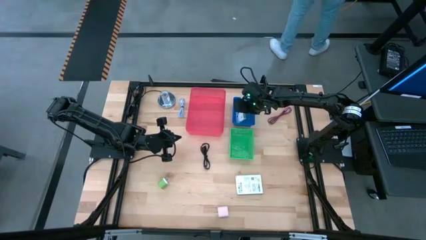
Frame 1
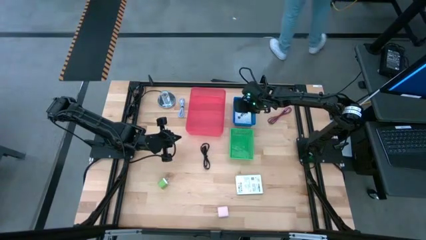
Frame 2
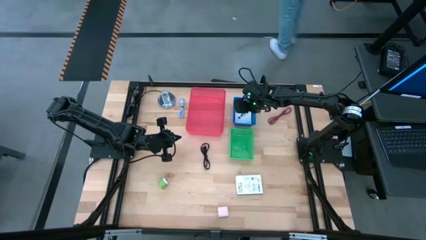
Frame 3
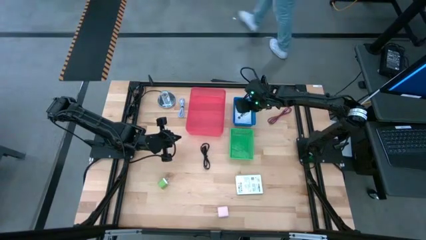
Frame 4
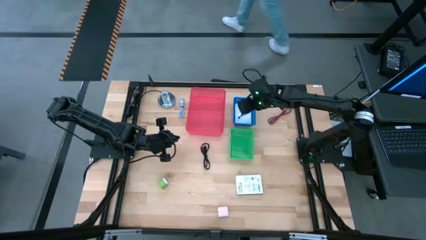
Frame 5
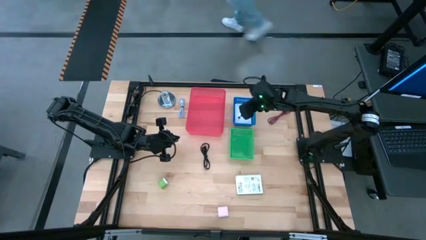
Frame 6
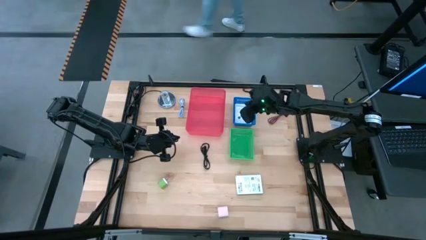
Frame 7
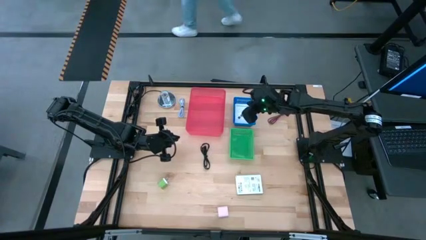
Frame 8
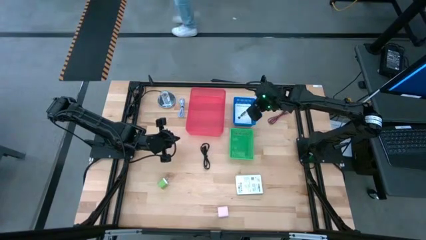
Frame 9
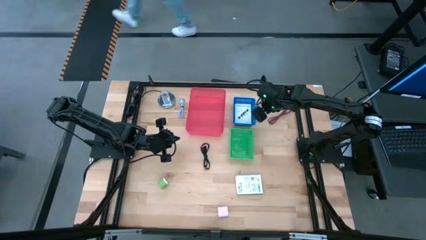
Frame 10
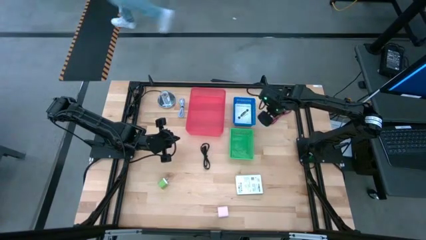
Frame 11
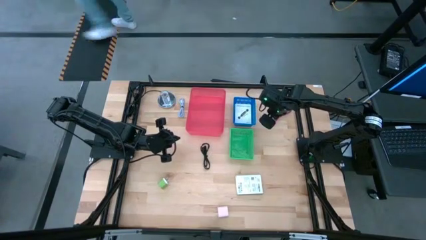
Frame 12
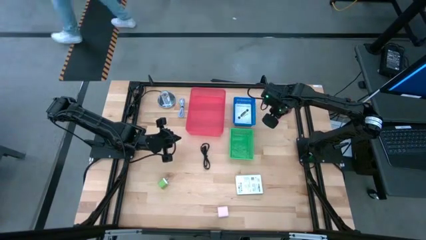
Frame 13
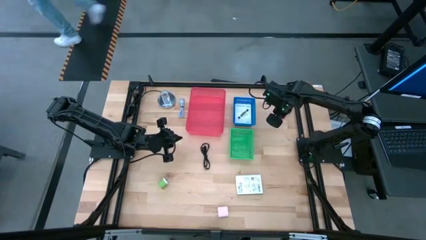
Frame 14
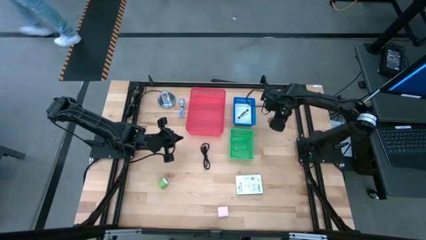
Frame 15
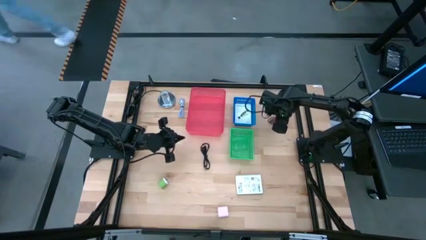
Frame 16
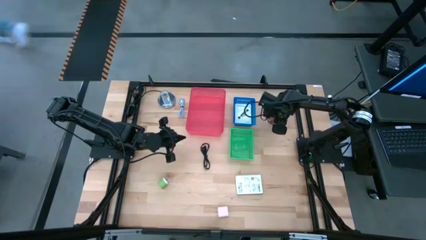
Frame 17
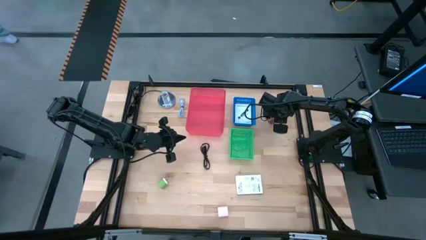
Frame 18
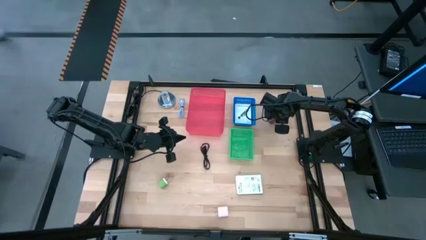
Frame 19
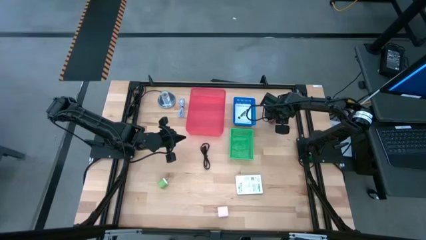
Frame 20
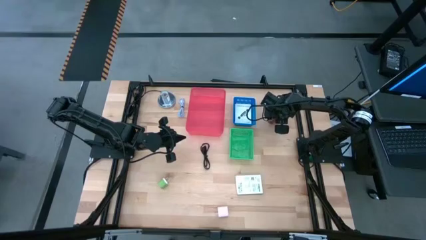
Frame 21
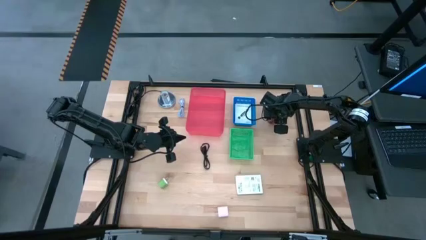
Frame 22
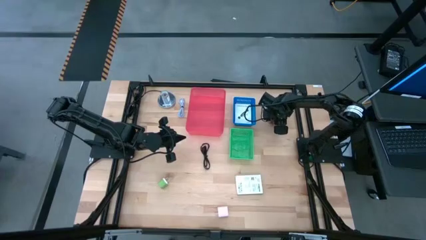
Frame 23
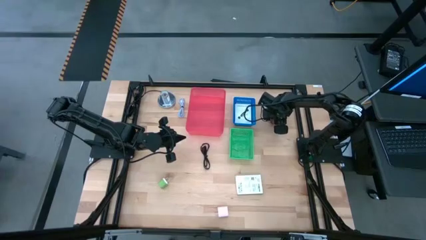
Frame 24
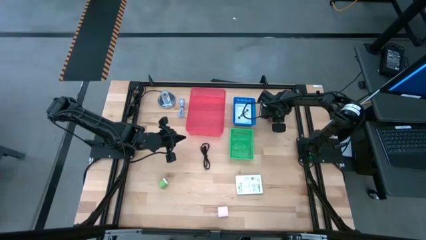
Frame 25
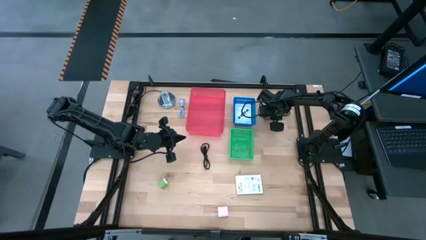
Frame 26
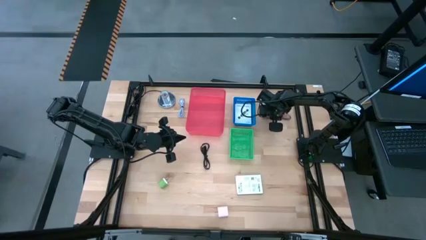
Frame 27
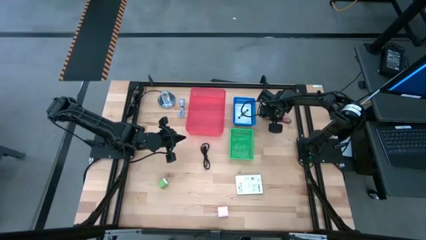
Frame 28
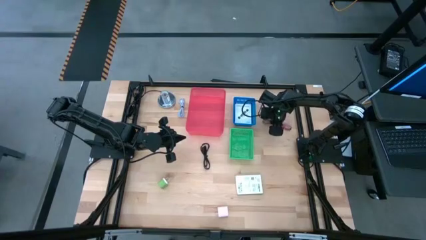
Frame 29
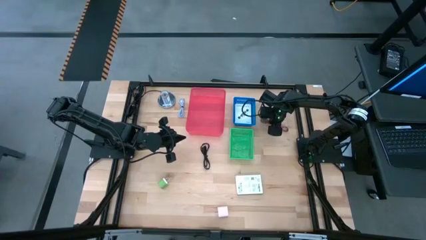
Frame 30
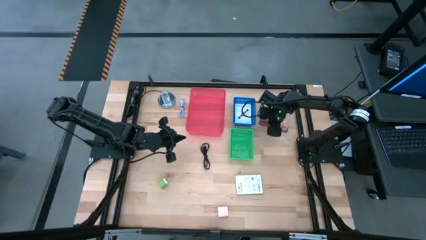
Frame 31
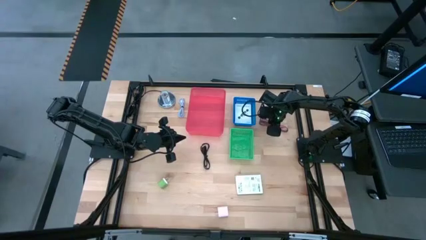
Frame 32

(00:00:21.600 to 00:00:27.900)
Task: Pick and place items into bin
Put the red USB cable into the red bin

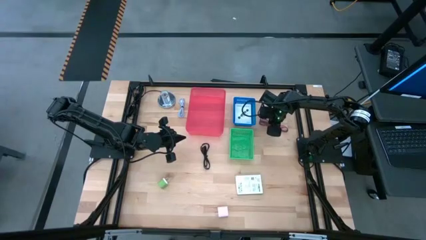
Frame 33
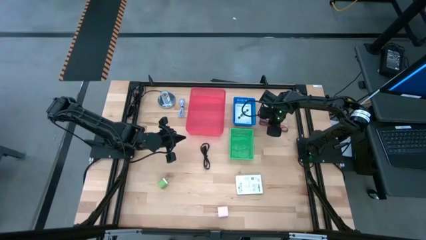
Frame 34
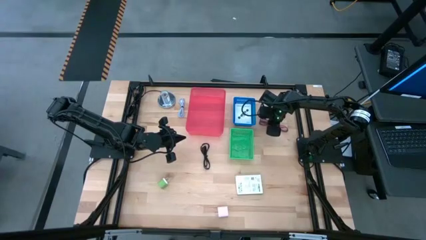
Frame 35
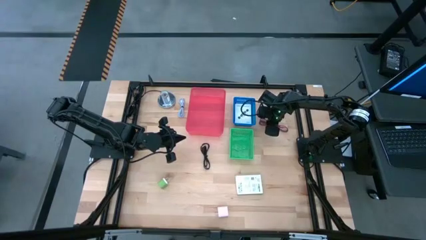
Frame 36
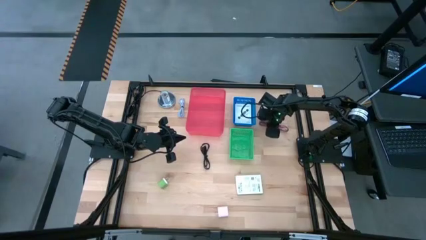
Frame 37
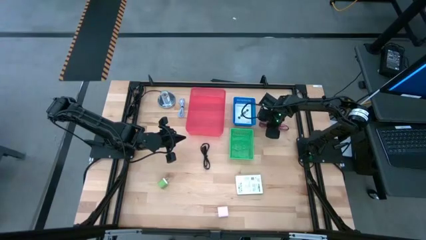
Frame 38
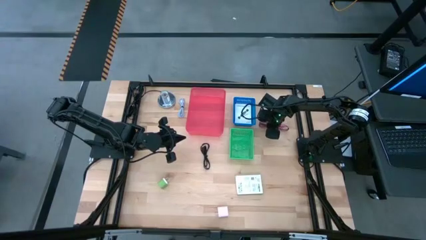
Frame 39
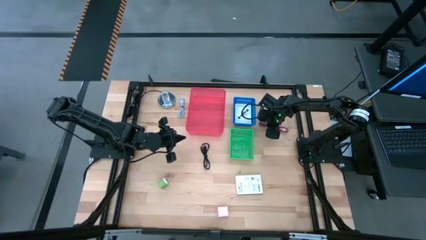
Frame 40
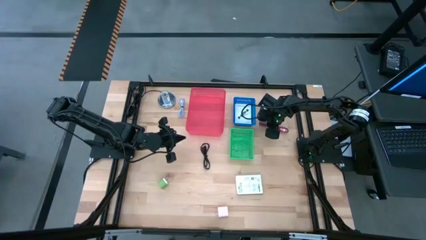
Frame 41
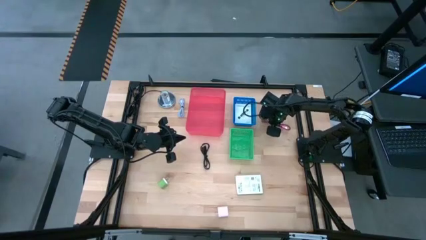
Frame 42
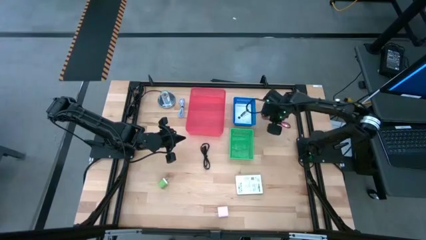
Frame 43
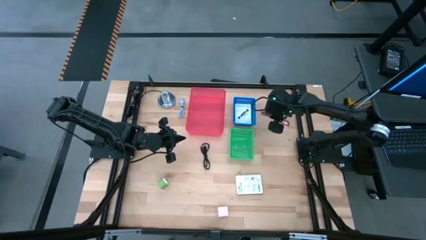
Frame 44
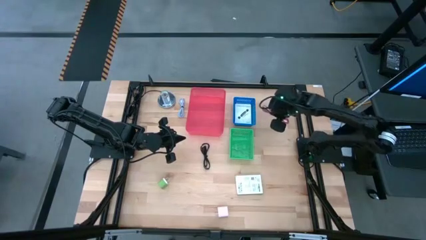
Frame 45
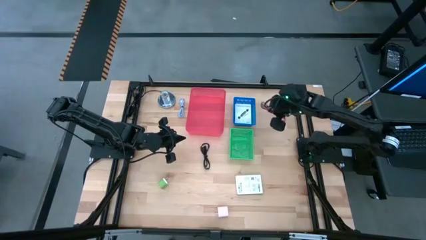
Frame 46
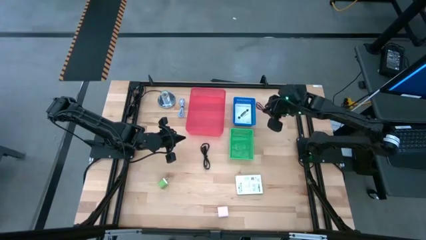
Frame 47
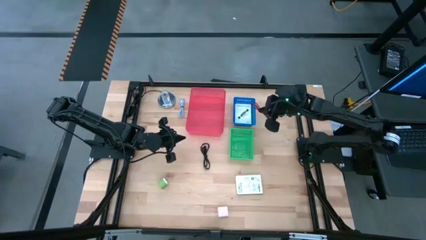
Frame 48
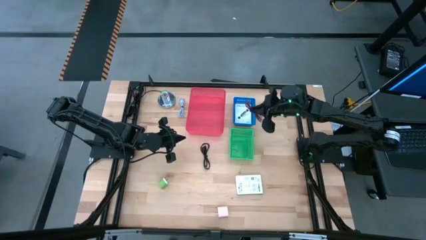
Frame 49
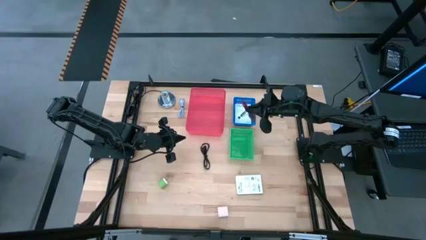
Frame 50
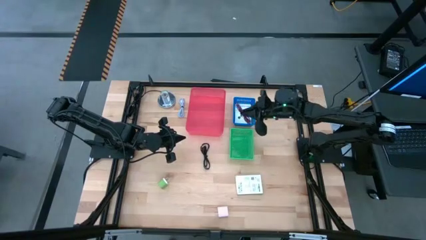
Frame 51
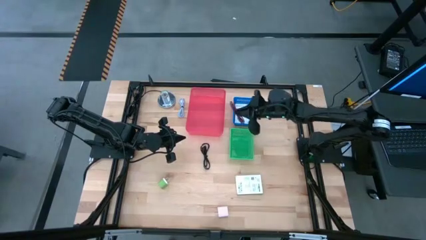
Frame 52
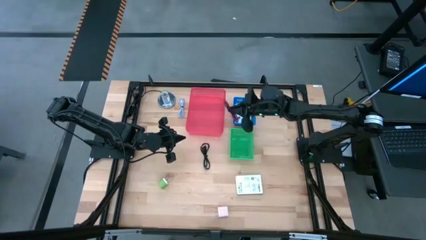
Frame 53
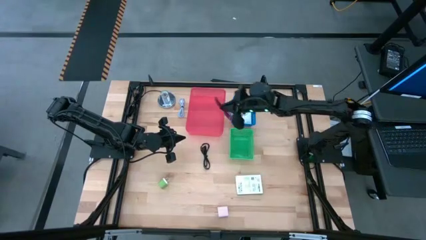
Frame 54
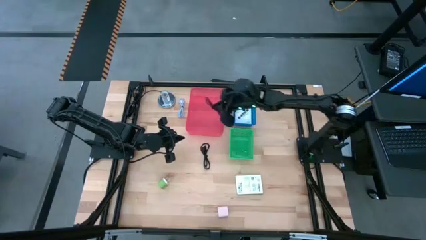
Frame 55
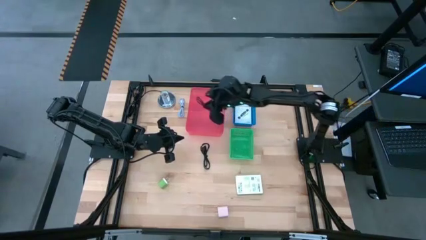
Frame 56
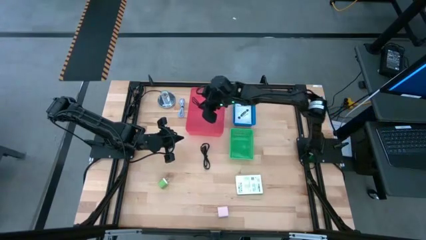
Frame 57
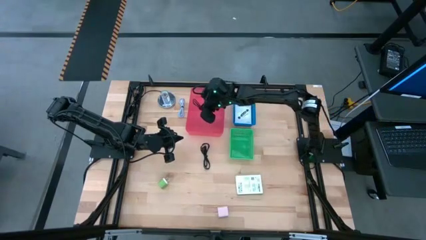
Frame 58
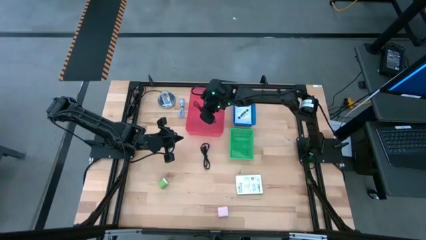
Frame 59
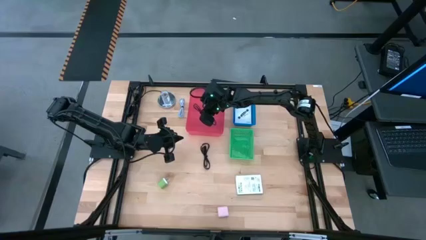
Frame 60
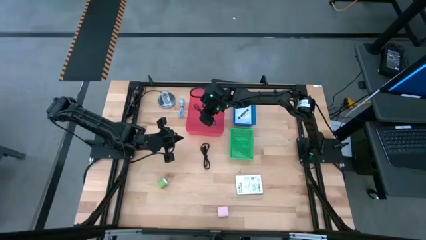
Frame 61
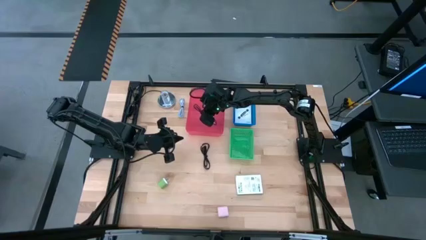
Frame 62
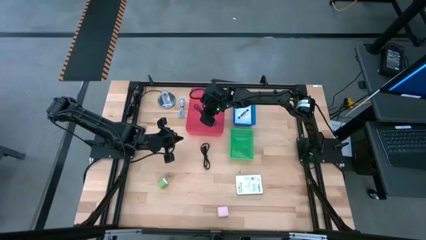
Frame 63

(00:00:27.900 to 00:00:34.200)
Put the red USB cable into the red bin
